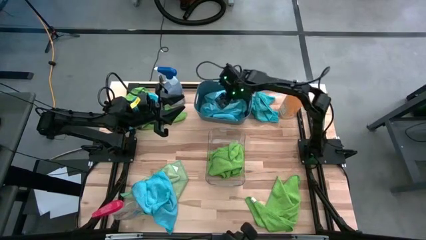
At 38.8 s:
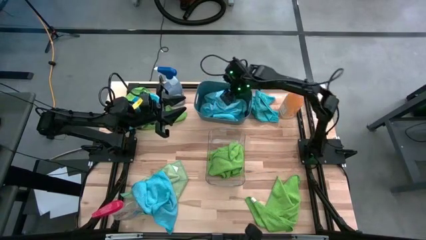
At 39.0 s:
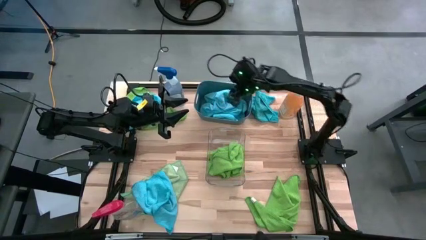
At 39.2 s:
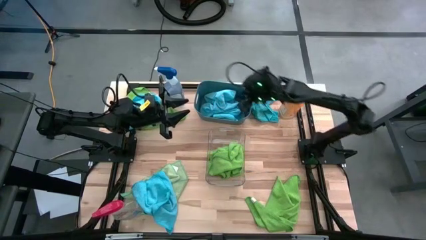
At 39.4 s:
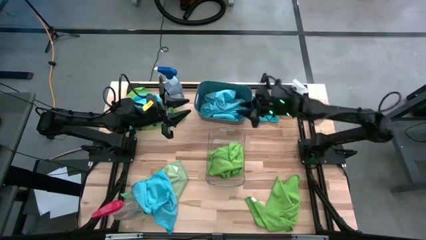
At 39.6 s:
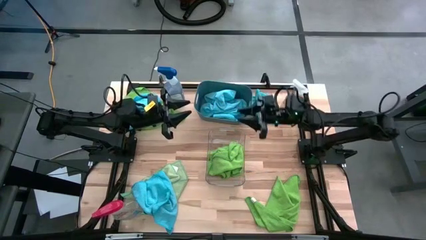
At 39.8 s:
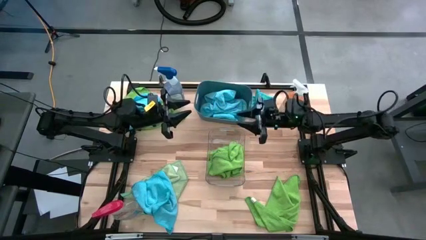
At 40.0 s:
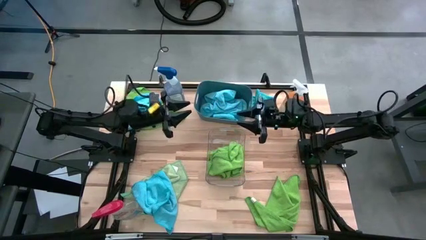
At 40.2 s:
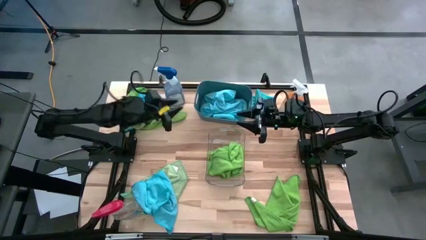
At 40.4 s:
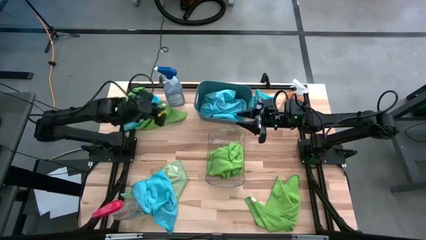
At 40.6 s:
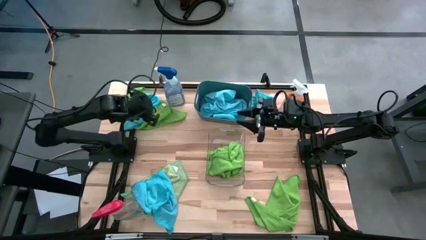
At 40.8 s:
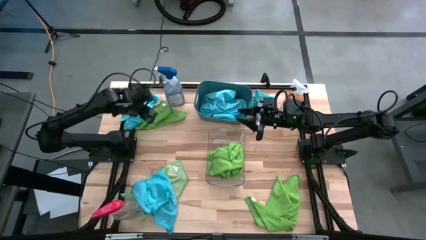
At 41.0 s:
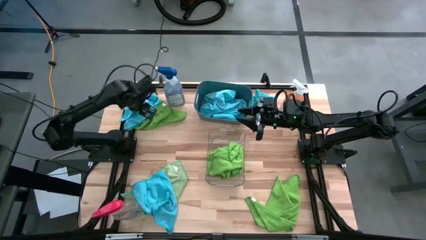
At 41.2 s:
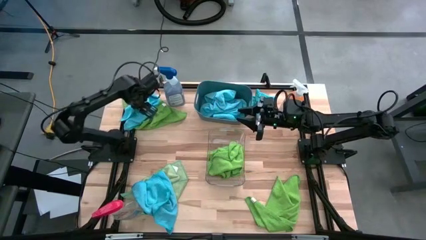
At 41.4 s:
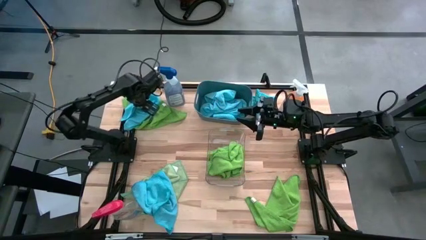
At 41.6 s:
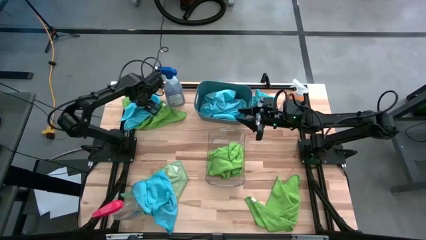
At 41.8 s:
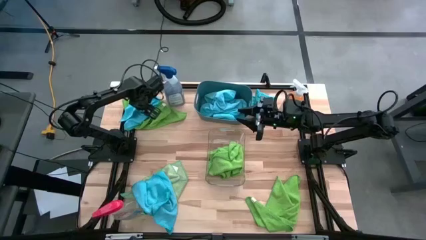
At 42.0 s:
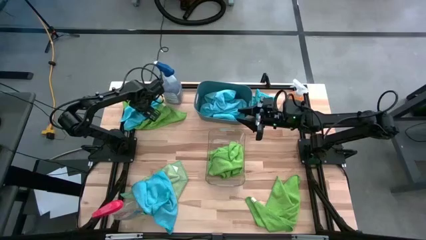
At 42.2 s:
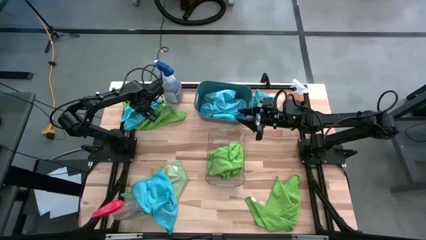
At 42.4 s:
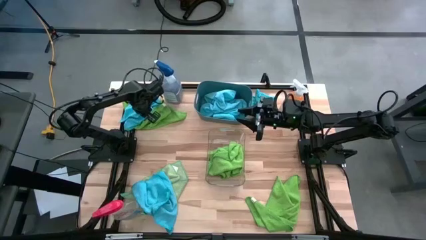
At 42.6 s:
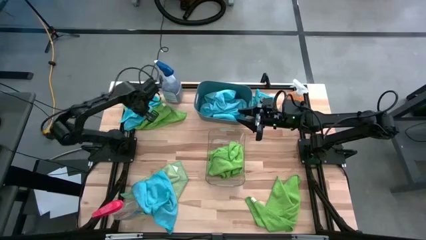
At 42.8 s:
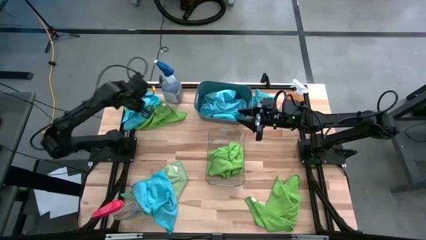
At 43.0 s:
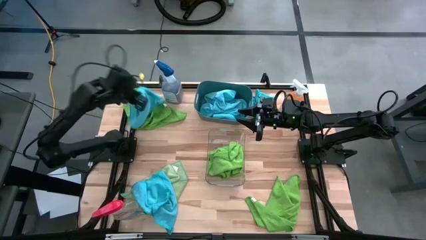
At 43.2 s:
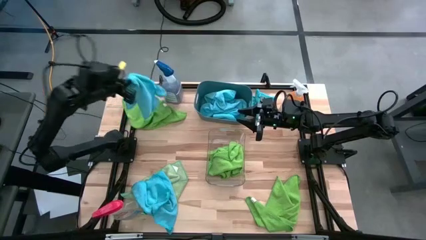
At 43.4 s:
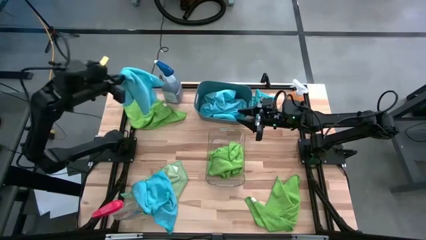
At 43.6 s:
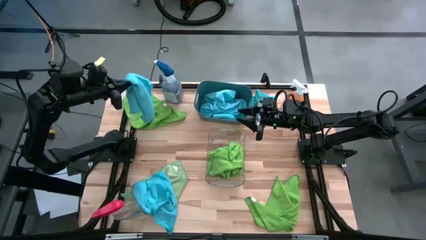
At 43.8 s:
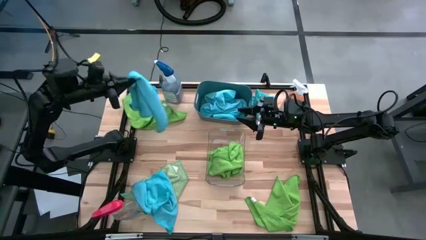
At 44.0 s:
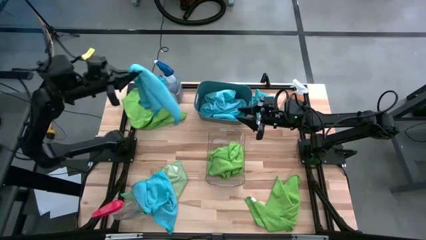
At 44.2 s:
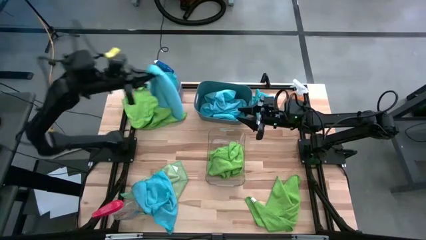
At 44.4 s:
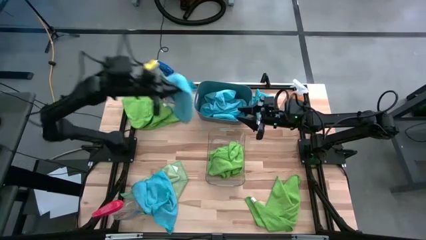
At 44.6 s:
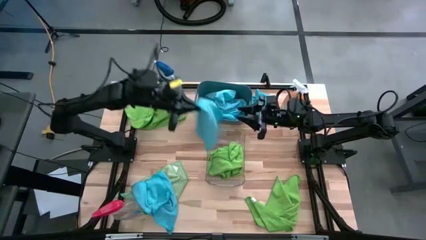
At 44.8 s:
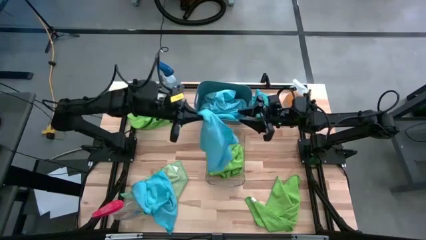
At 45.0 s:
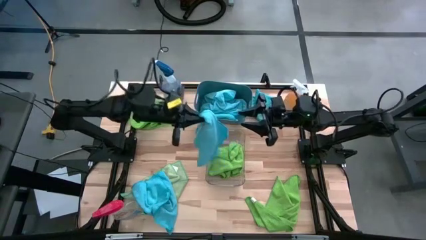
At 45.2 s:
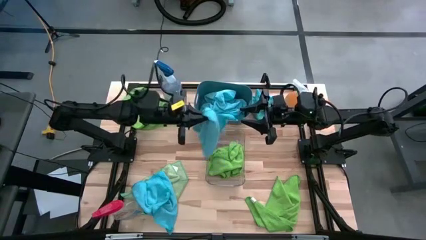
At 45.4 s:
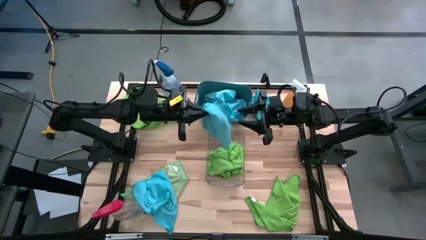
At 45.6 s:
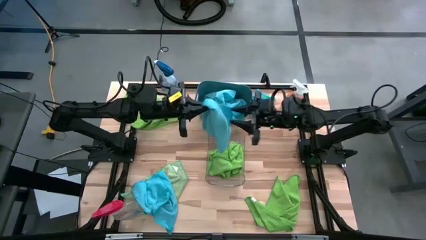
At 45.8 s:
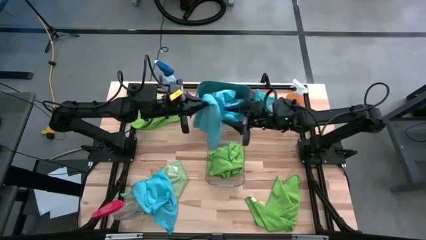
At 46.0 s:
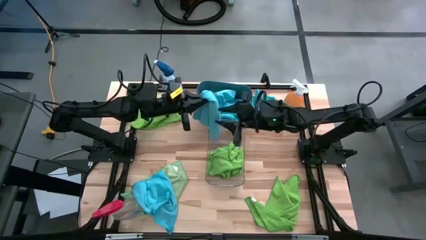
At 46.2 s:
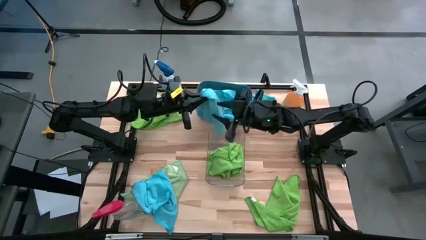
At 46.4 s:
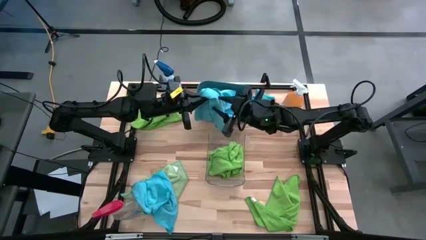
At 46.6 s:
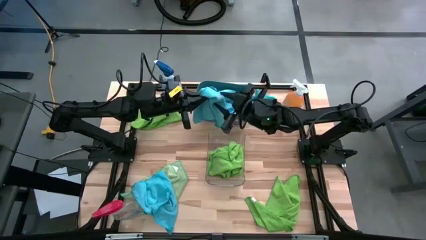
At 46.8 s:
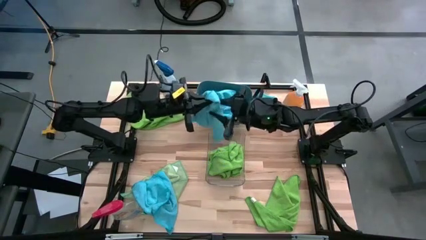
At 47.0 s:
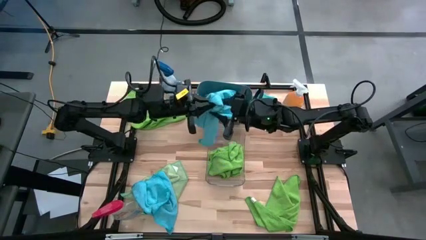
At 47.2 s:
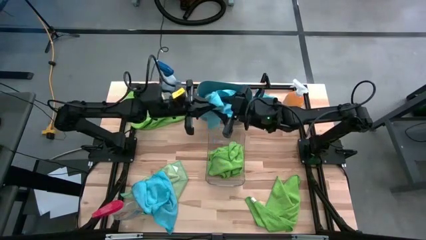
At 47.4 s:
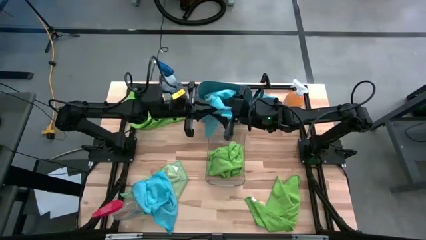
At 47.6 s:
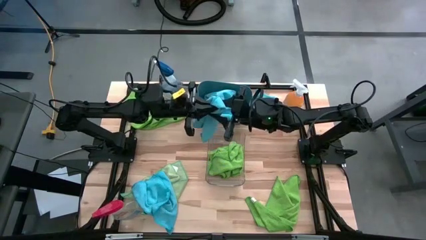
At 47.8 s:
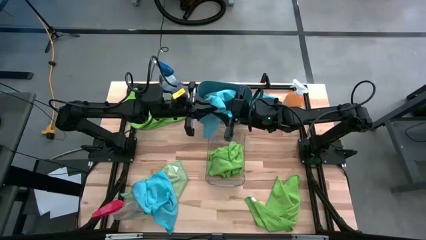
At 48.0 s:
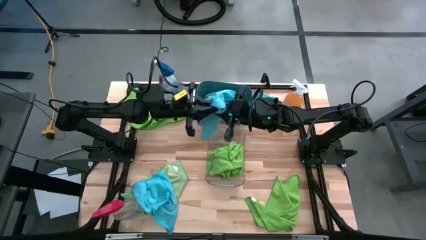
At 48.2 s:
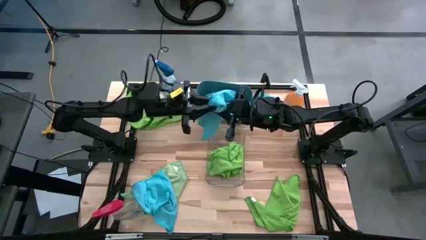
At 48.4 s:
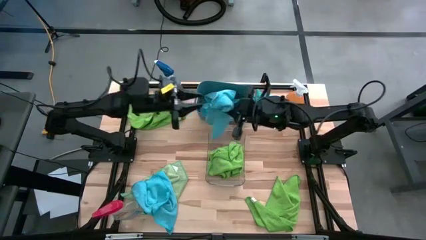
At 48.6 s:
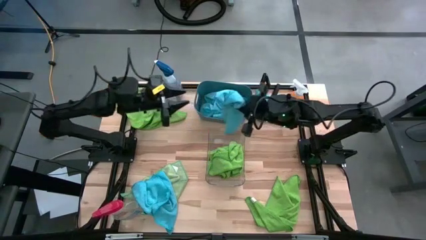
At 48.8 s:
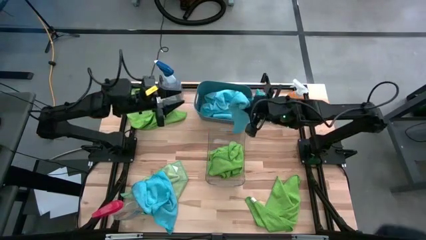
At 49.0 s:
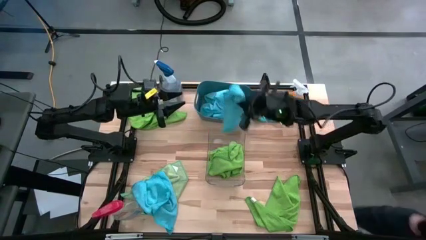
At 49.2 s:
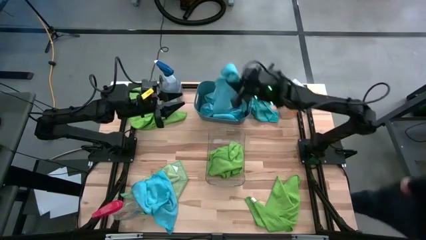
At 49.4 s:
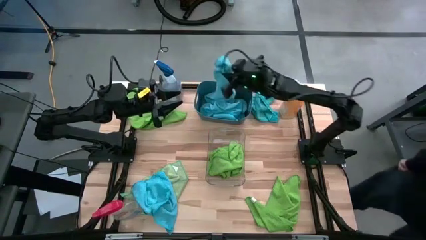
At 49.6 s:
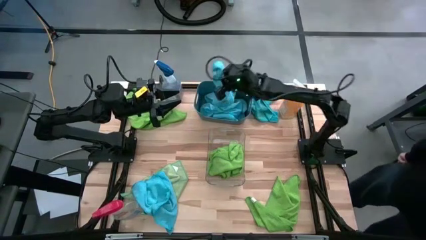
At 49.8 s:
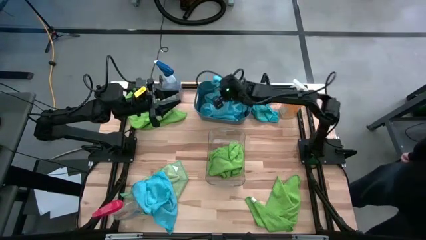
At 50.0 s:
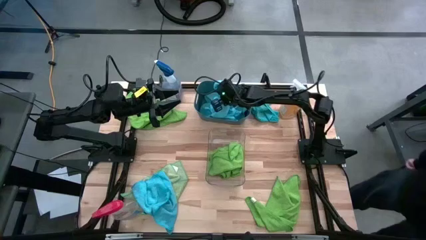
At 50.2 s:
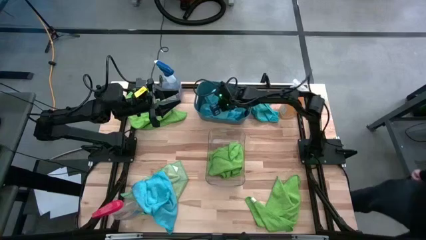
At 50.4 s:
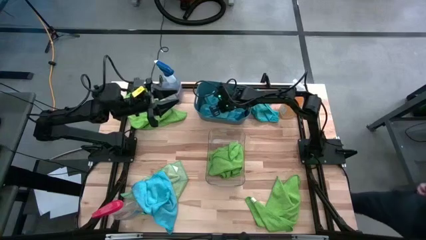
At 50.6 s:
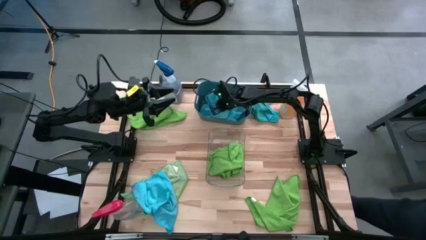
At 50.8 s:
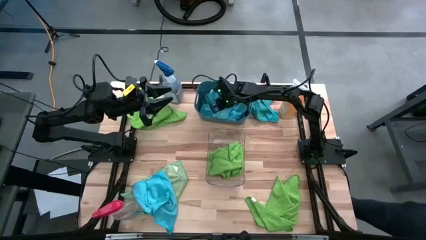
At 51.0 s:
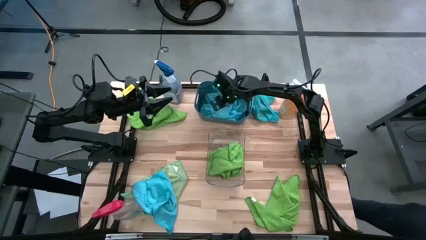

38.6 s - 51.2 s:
Task: Sort microfiber towel by color & place in baskets
Put the blue microfiber towel into the blue bin
